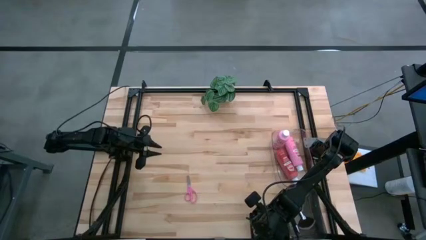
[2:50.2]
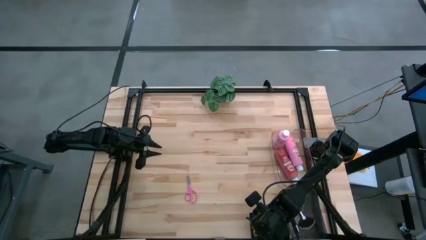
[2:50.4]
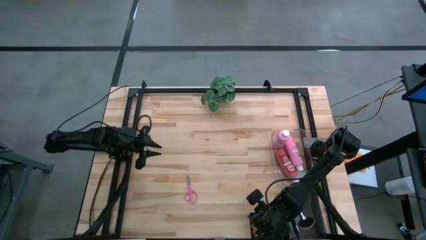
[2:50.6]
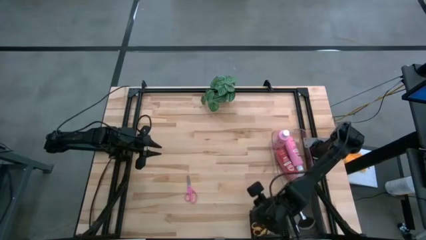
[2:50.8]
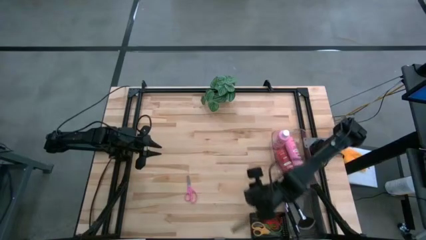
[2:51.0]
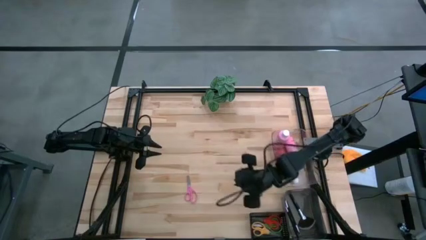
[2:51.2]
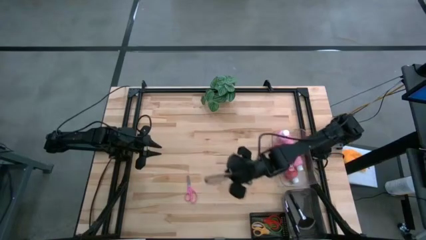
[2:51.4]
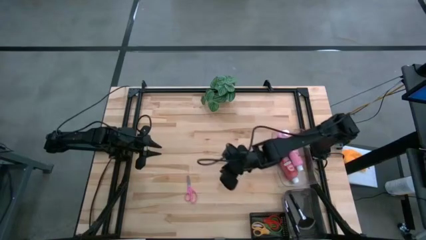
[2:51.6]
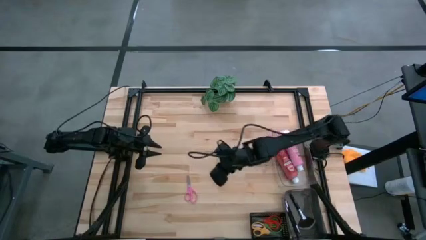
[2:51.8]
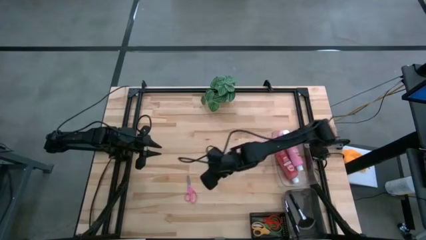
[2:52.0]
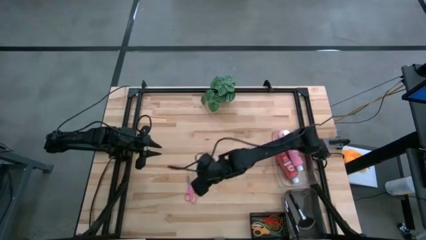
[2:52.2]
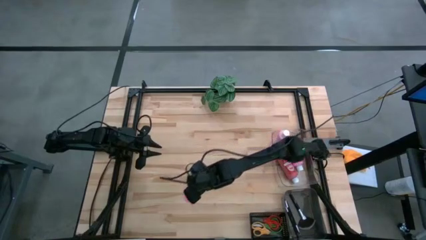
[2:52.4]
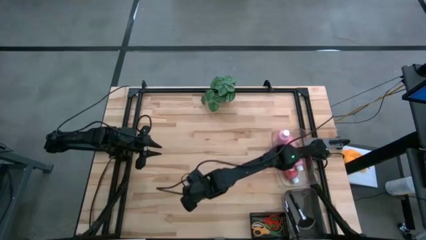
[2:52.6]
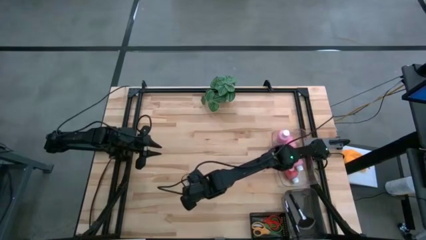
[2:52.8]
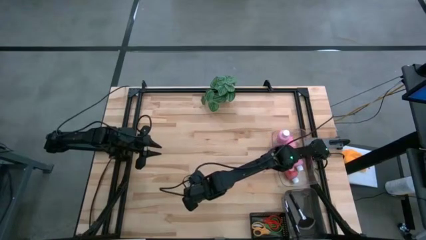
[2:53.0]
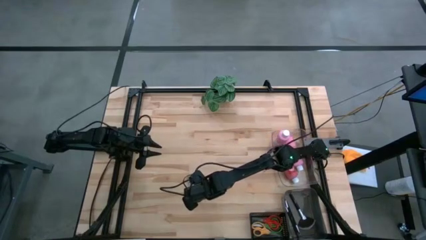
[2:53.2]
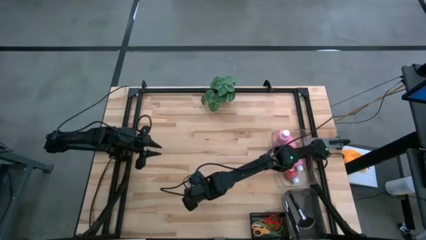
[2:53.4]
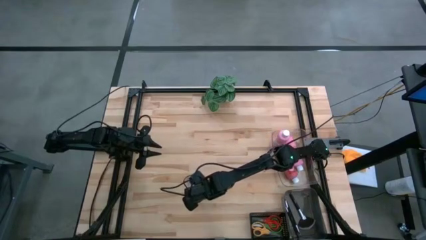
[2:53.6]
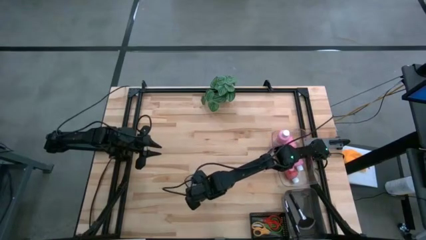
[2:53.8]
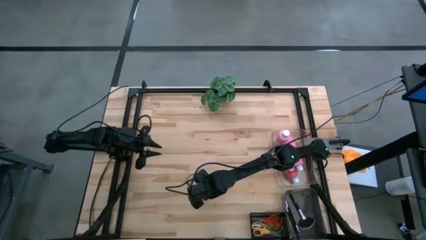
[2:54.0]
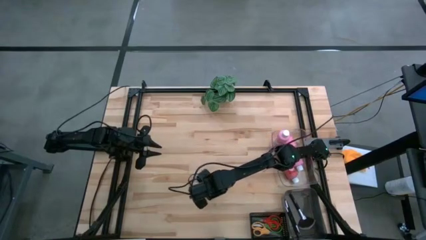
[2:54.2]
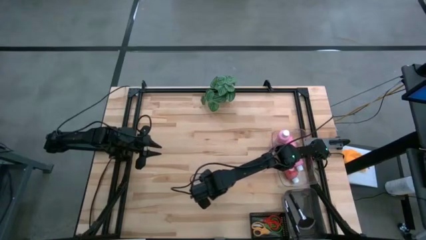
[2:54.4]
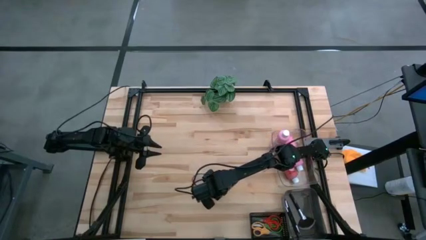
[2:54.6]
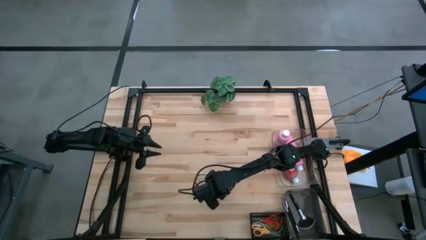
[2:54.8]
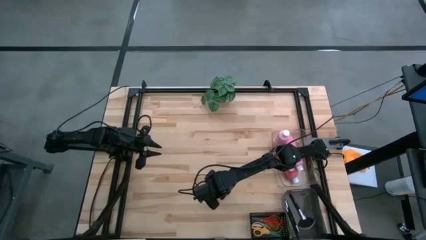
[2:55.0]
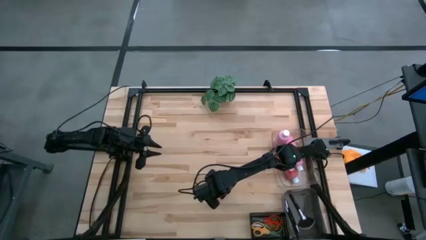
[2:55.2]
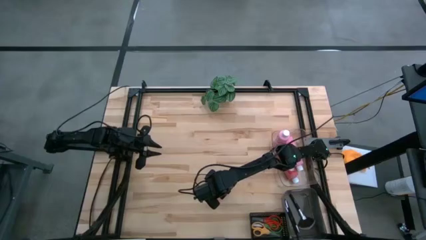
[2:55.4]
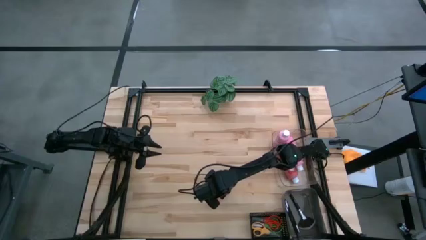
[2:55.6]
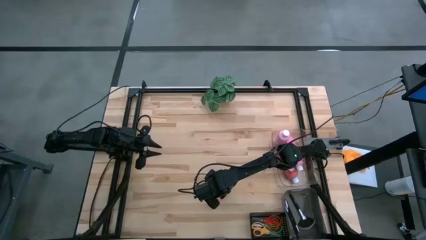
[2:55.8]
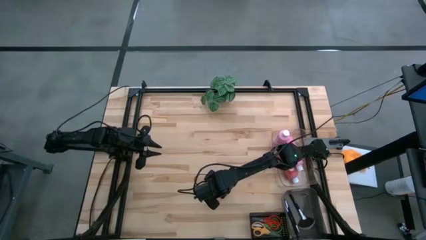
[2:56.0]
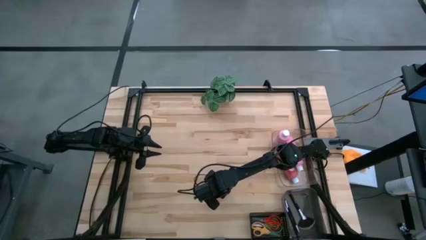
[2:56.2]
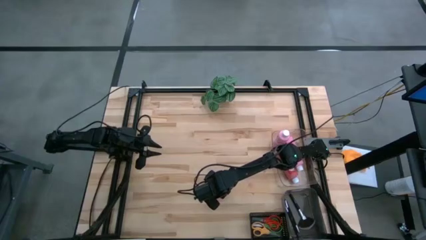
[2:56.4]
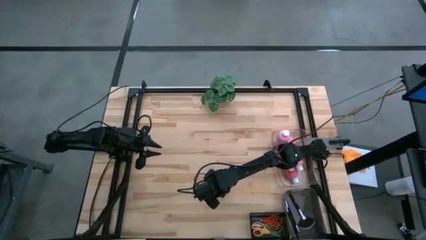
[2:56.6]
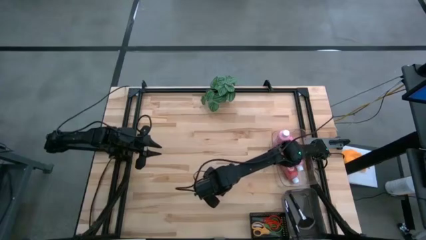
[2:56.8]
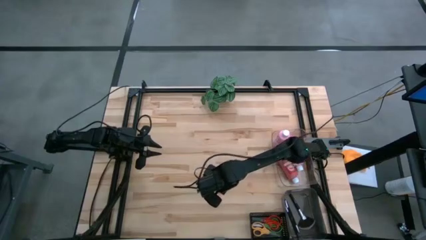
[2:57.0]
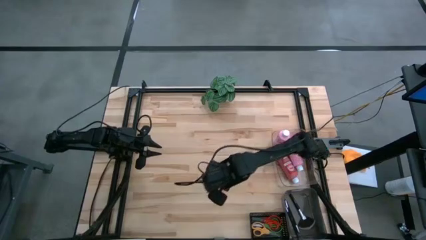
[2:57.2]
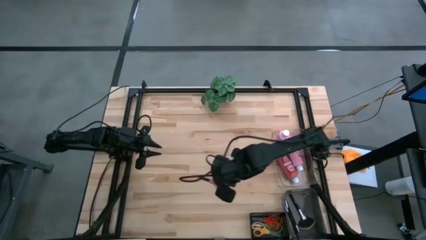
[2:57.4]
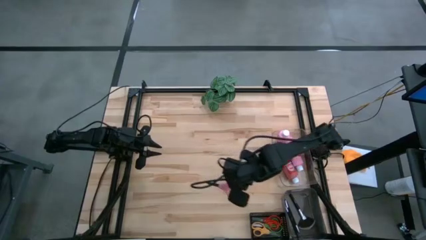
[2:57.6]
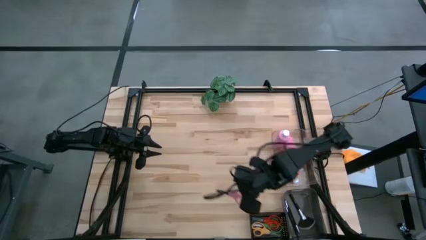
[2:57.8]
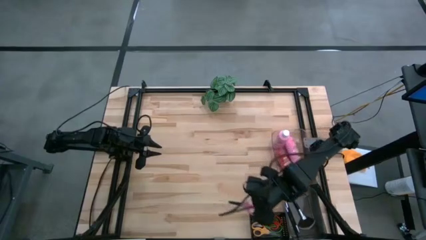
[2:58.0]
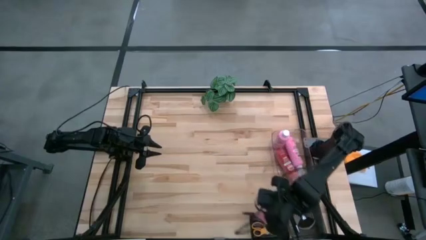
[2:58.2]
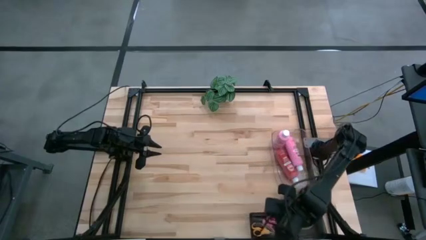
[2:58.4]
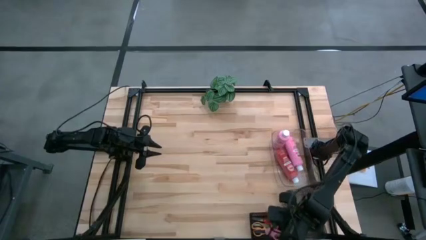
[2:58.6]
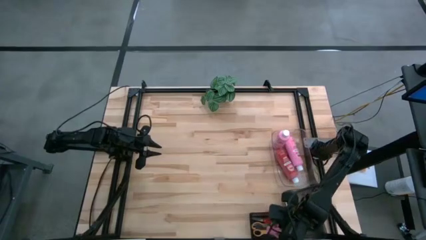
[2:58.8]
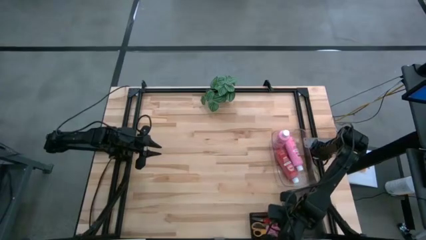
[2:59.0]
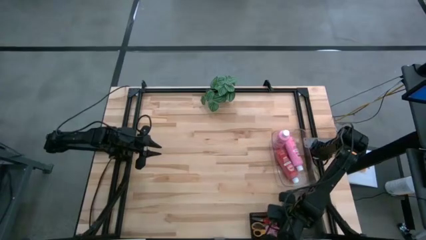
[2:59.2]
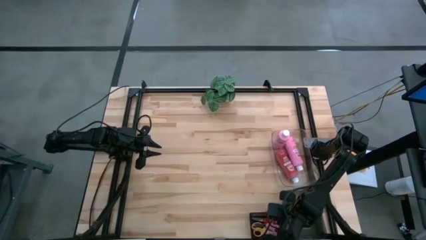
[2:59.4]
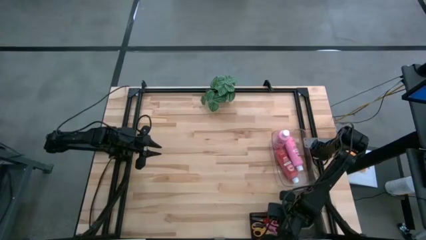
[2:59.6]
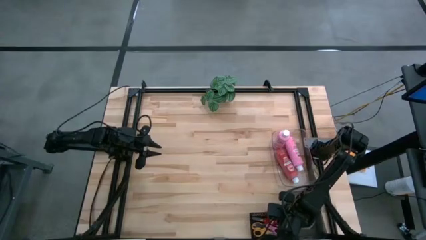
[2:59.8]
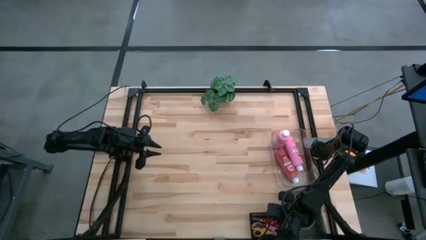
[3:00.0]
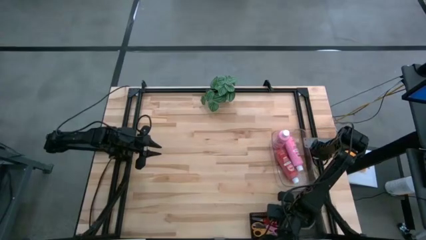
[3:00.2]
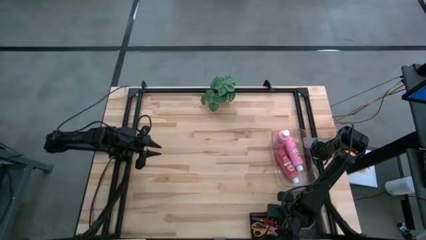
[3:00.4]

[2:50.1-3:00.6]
Task: Pick & Place Paint Supplies
Put the pink scissors into the black bin

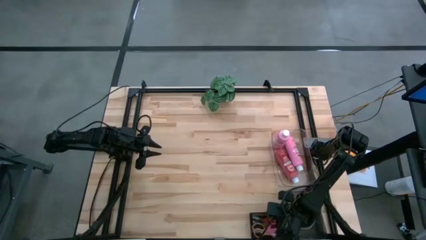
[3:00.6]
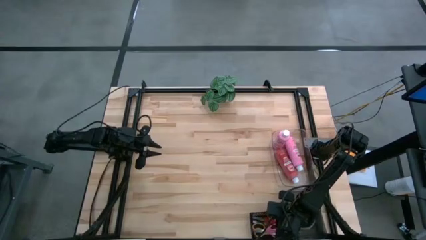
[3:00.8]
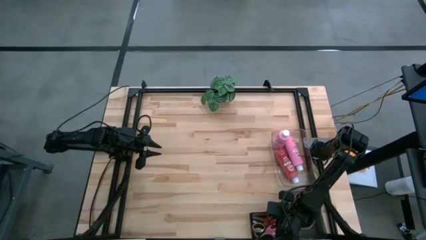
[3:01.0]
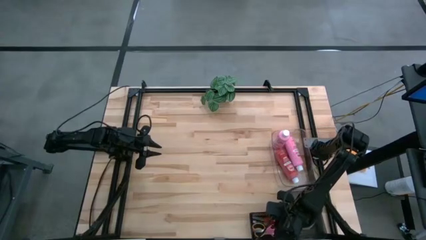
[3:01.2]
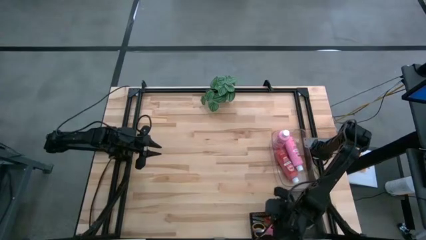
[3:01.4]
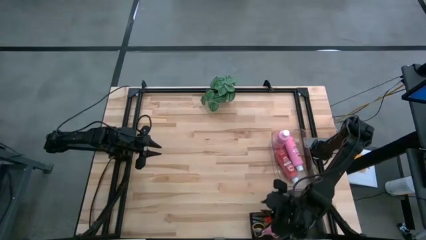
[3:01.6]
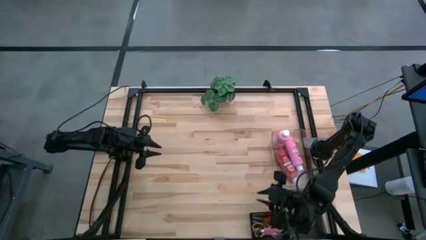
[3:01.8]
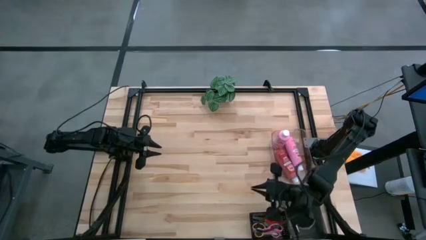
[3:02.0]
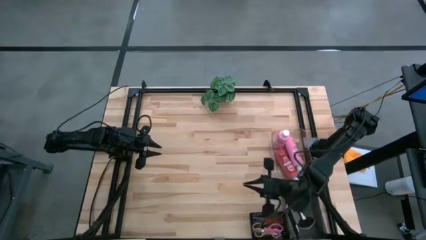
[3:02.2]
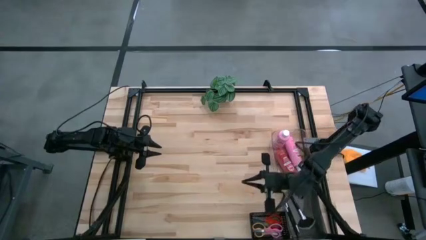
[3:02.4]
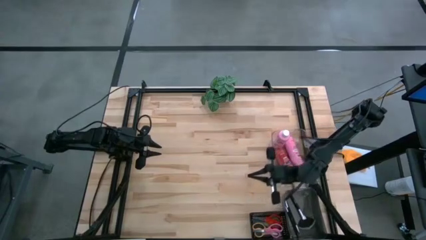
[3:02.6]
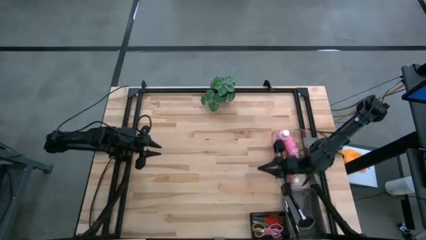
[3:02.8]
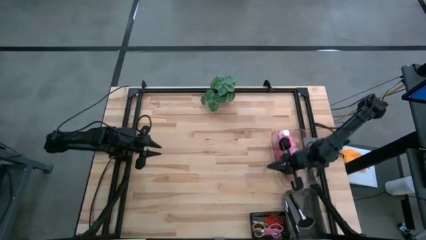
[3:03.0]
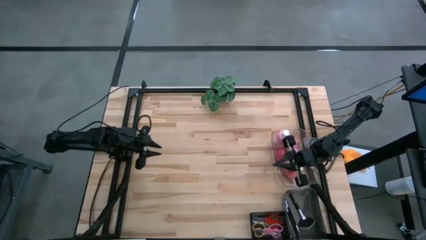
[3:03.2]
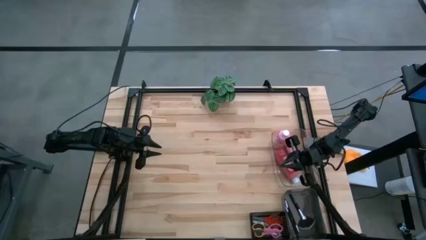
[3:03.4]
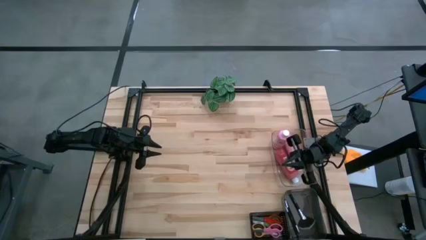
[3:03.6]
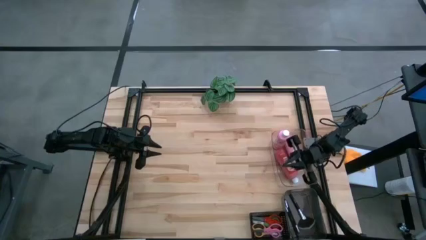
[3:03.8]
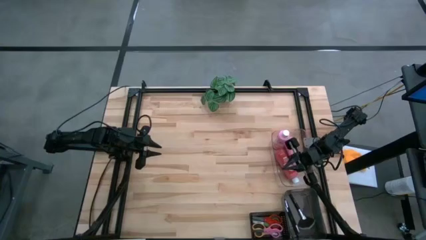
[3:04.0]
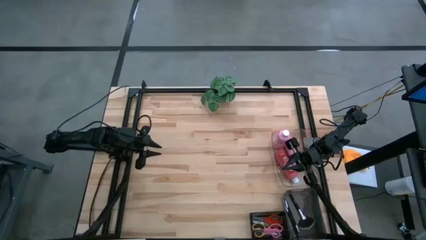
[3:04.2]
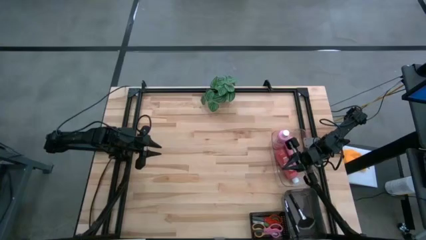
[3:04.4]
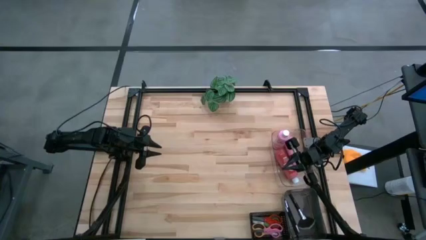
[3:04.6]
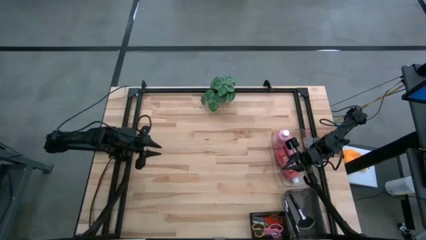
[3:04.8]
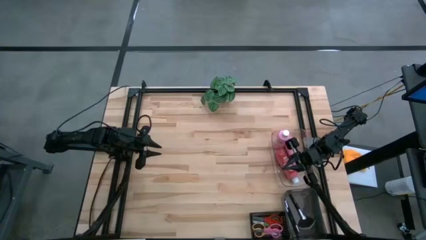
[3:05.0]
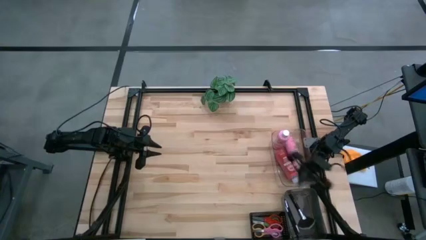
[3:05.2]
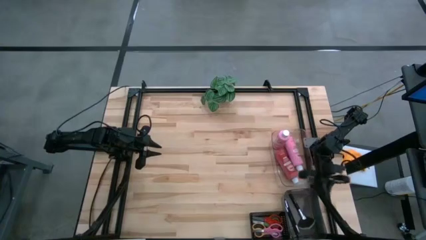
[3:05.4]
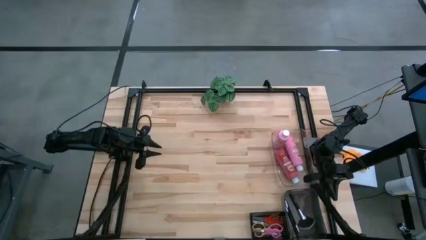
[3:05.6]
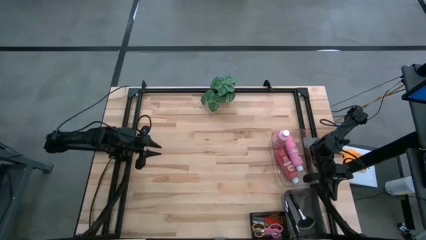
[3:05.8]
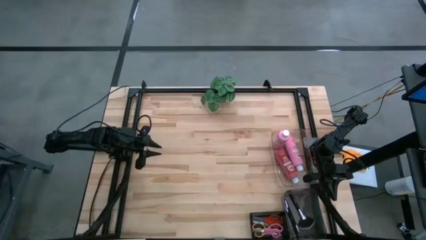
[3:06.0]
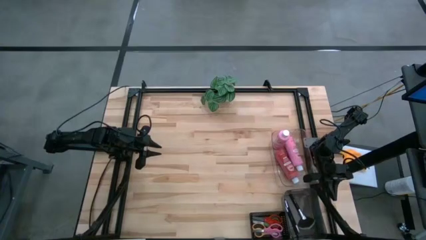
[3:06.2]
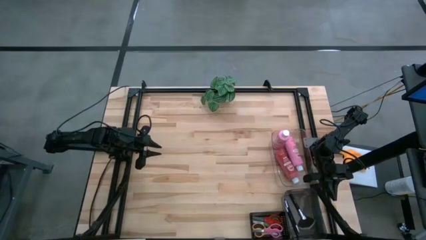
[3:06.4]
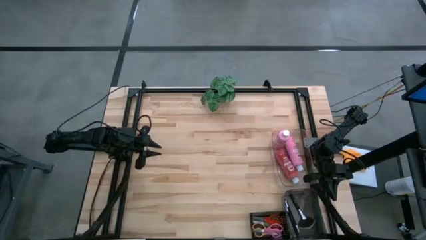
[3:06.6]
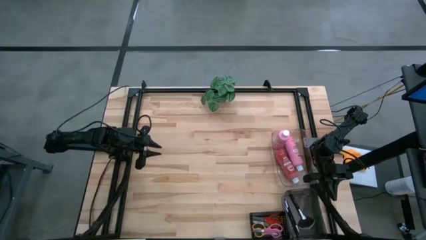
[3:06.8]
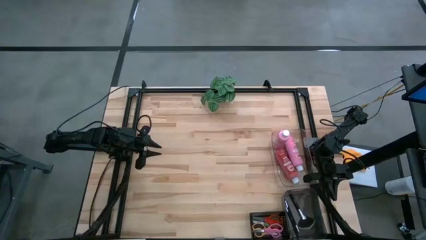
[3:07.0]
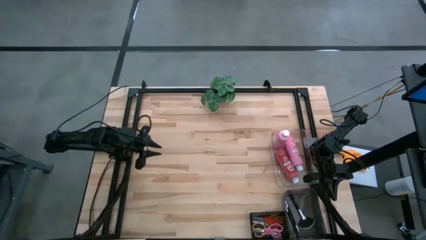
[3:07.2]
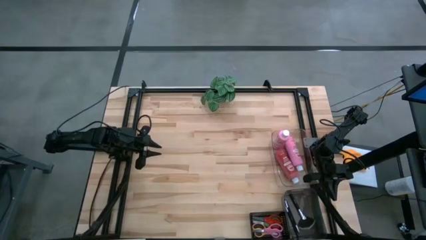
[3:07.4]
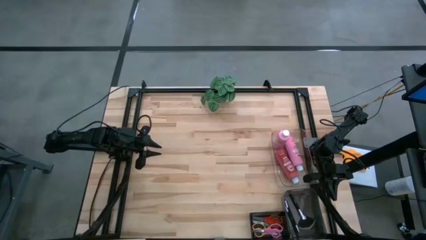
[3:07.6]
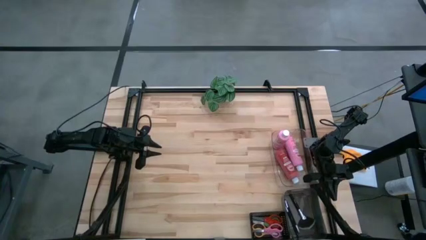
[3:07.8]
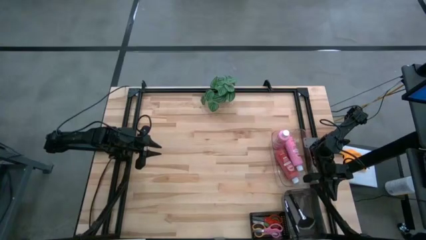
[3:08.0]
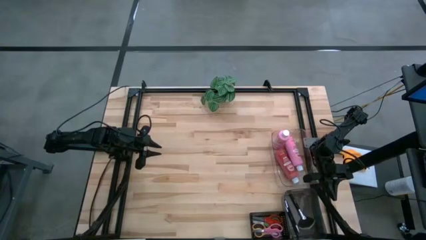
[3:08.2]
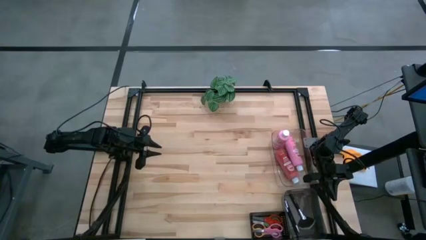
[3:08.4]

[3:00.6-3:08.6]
Return to Home Position
